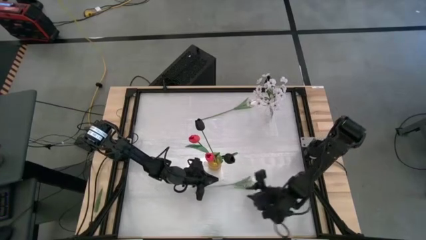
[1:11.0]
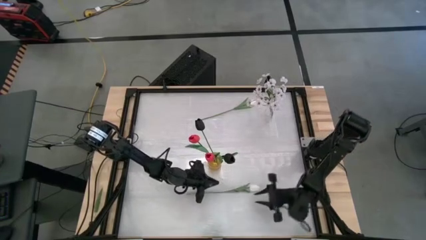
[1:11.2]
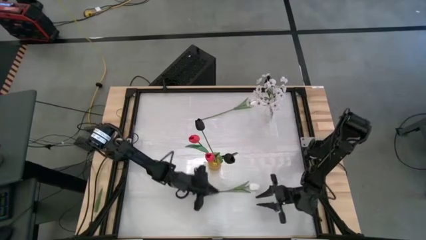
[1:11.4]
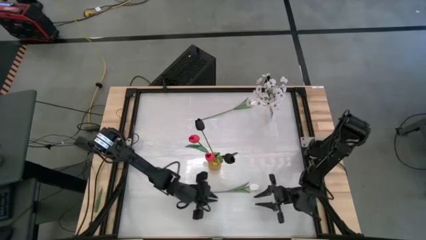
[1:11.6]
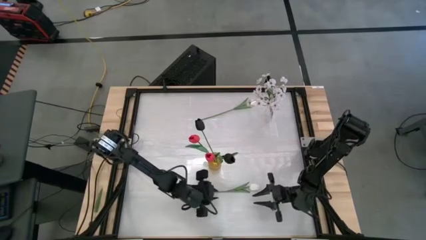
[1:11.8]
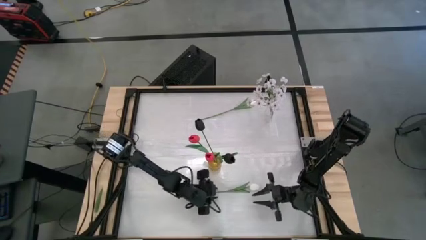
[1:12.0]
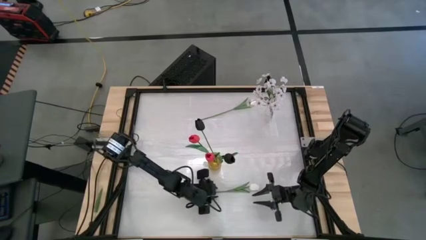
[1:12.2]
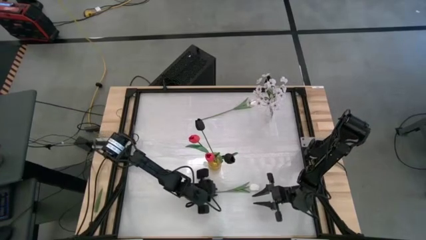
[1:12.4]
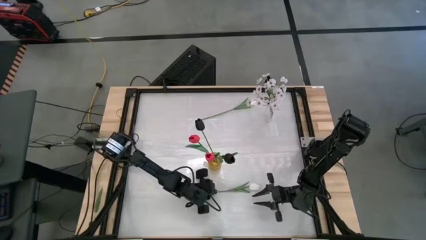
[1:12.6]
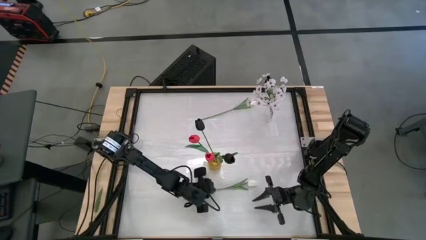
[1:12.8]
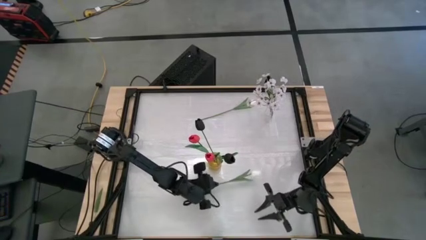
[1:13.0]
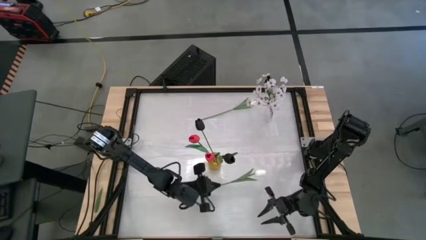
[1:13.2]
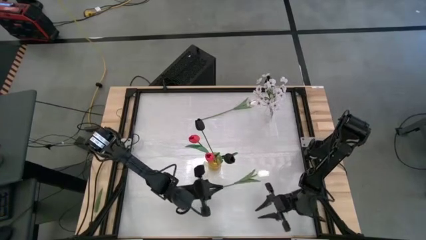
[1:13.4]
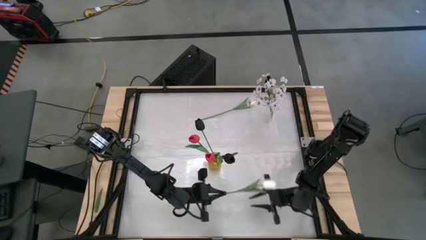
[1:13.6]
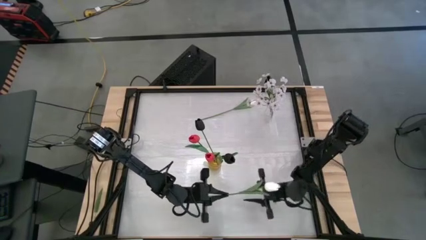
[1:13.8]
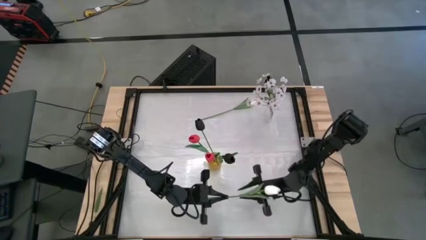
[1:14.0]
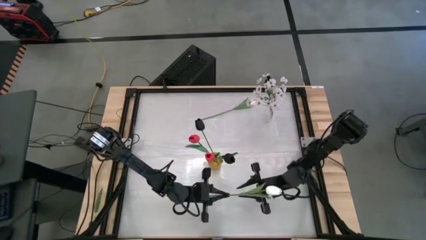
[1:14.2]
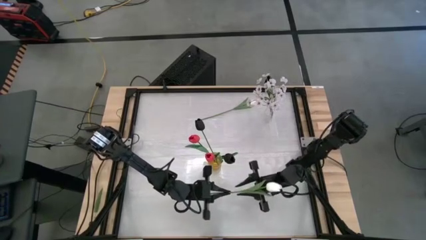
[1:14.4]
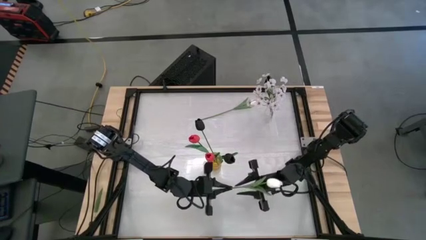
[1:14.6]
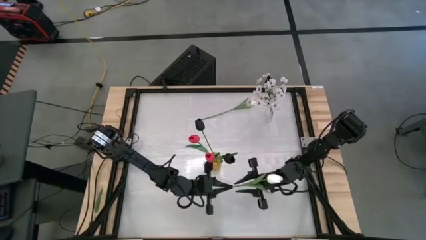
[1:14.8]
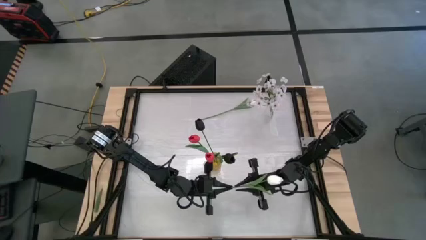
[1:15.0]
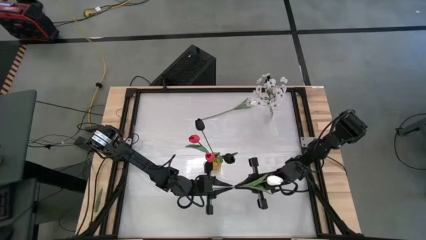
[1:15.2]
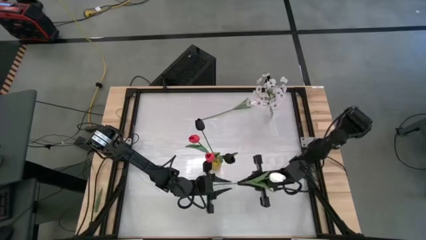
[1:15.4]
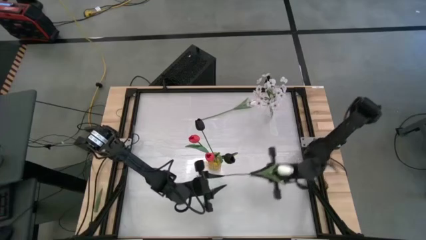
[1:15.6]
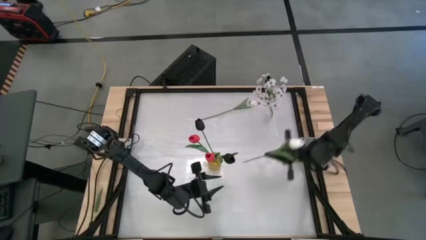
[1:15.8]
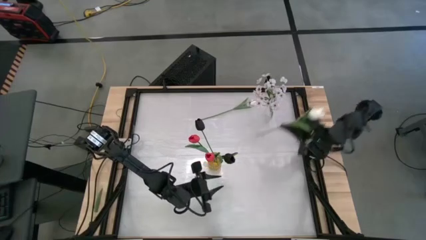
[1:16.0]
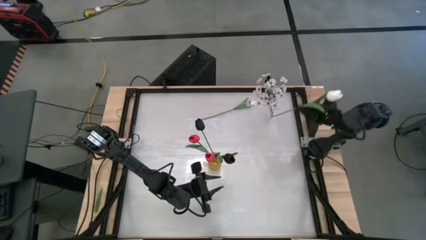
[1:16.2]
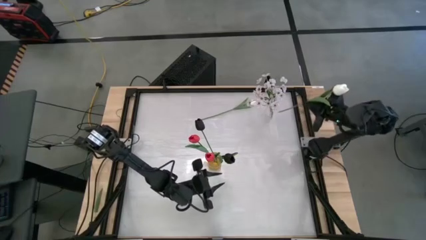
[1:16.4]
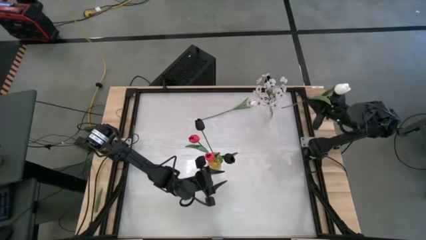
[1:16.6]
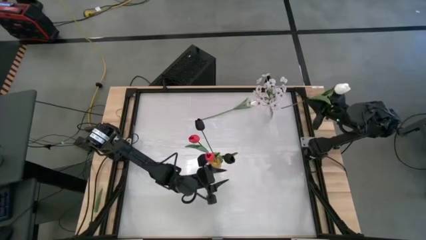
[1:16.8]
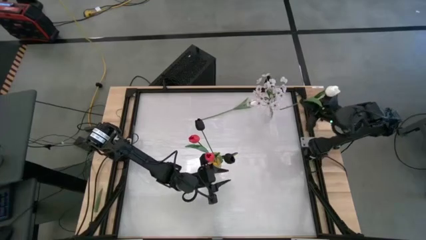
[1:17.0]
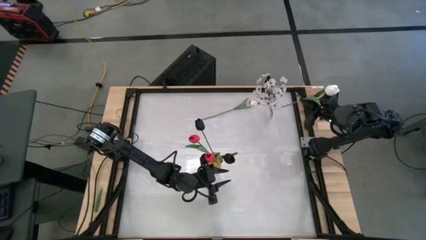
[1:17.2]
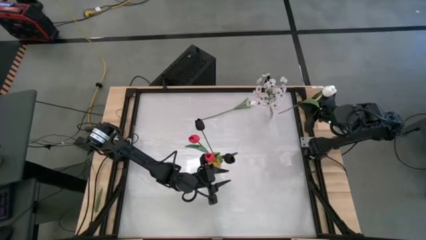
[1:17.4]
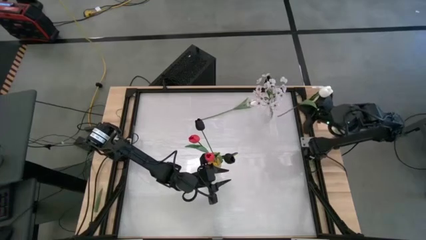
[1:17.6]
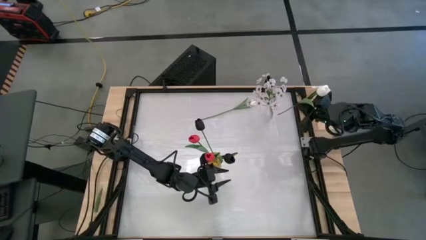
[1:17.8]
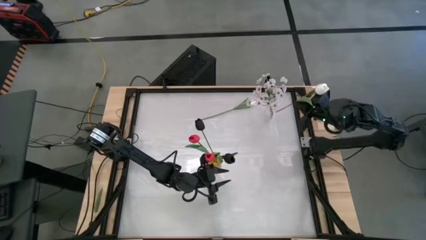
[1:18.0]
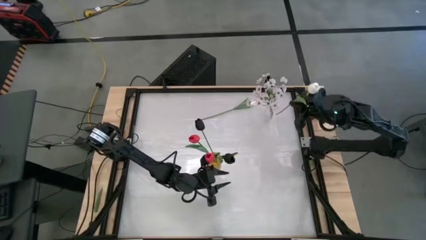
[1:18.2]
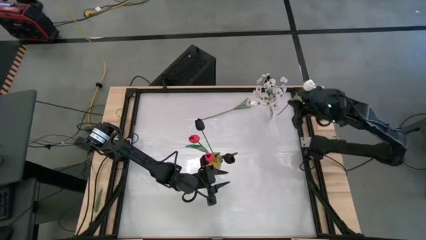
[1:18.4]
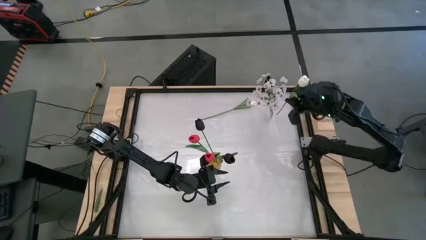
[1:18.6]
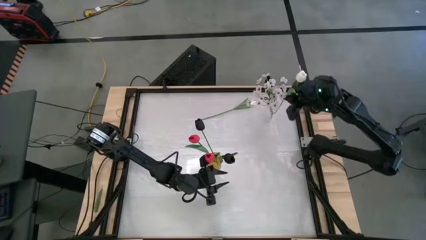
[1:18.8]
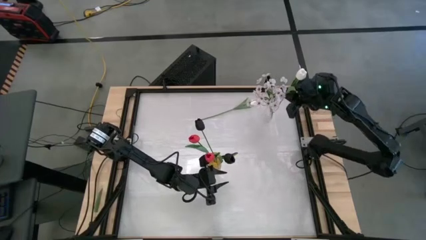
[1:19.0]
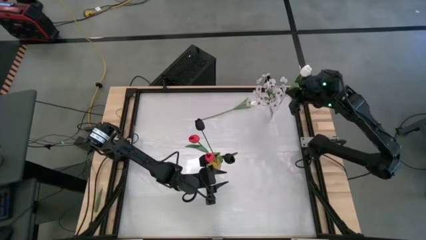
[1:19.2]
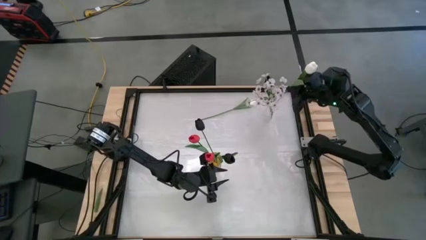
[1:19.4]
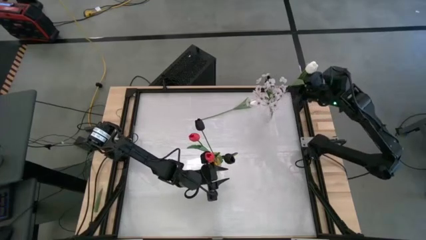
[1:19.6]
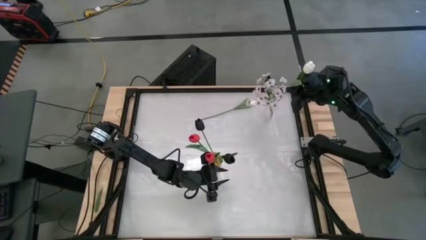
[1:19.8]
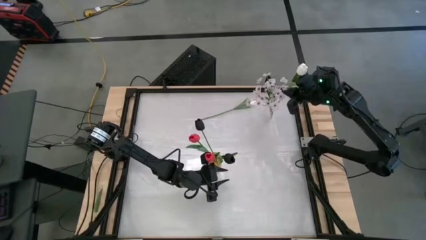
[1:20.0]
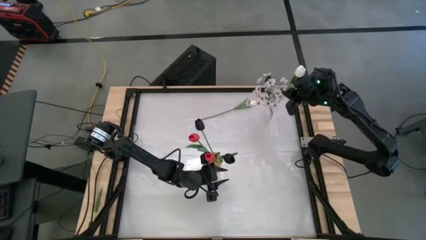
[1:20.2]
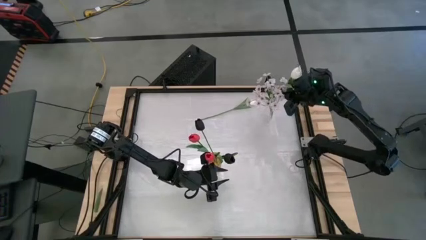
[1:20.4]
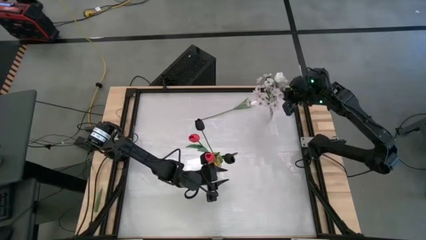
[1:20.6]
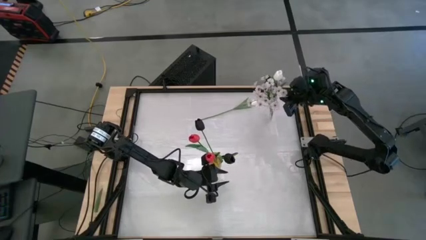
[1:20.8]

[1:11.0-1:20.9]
Task: Sort flowers into vase by color
Put the bottom white tulip into the transparent vase

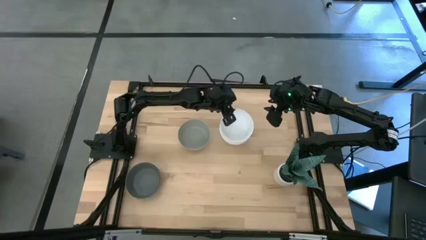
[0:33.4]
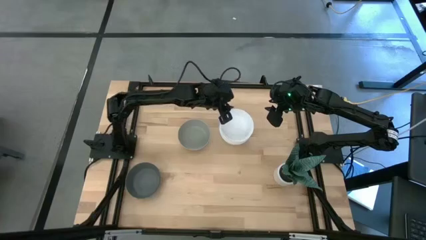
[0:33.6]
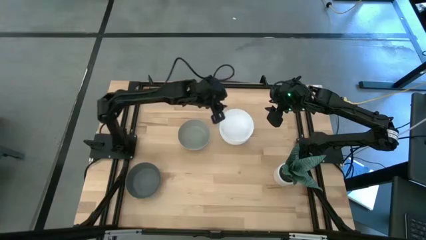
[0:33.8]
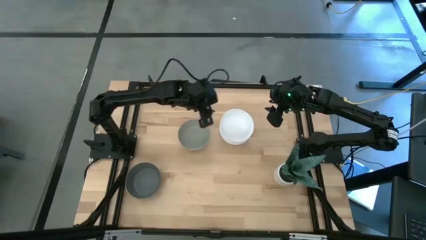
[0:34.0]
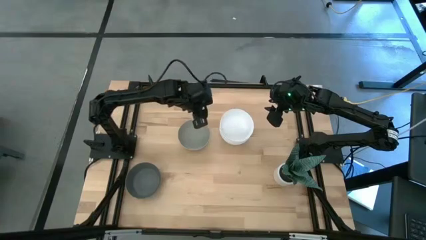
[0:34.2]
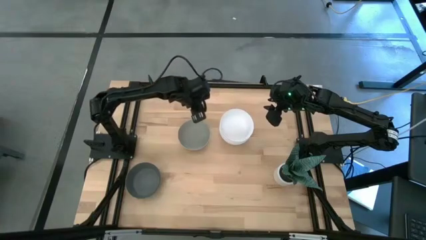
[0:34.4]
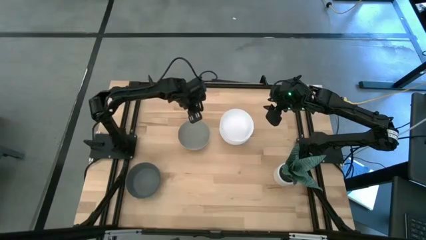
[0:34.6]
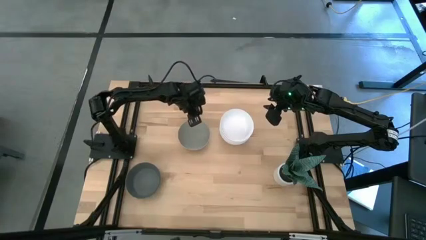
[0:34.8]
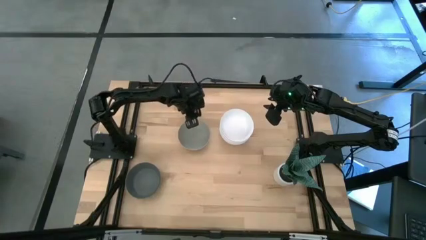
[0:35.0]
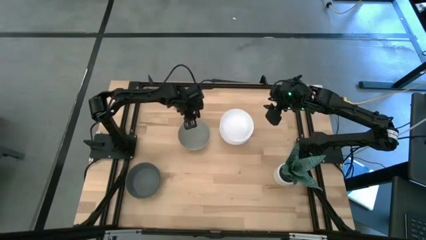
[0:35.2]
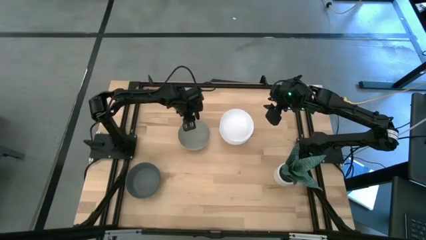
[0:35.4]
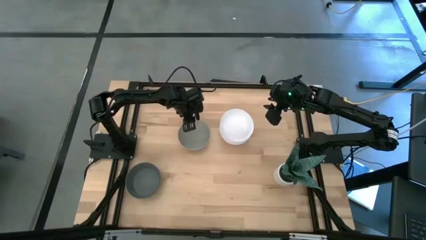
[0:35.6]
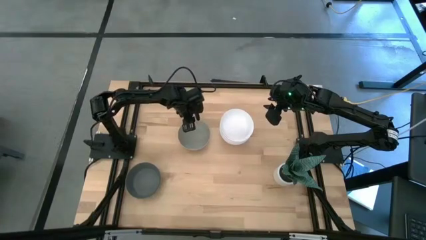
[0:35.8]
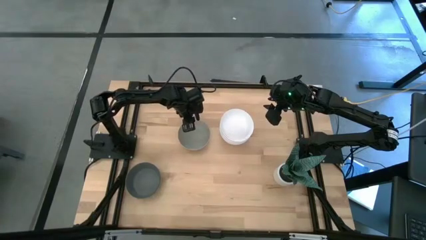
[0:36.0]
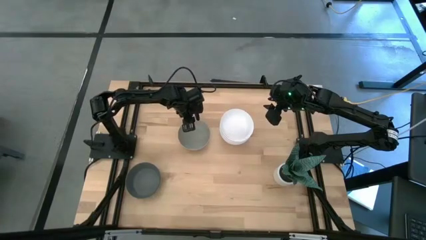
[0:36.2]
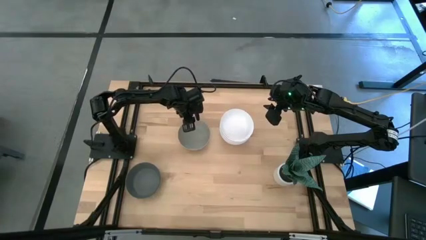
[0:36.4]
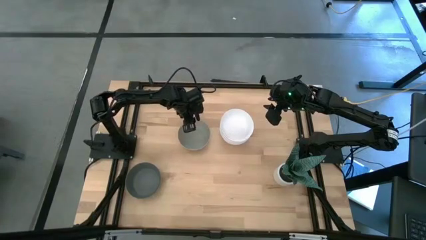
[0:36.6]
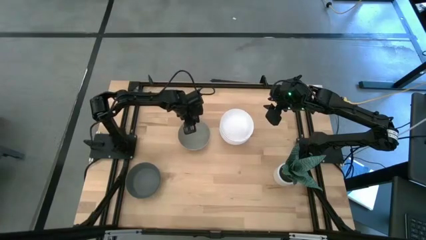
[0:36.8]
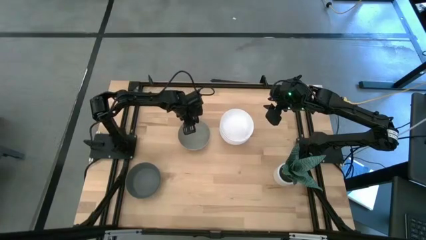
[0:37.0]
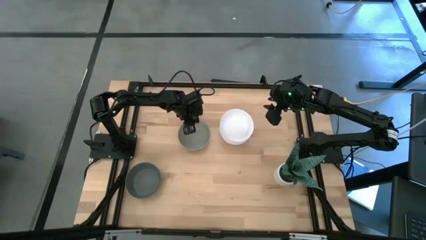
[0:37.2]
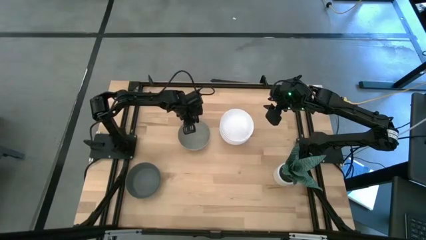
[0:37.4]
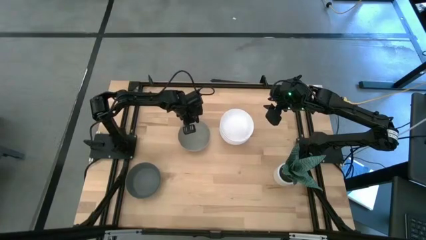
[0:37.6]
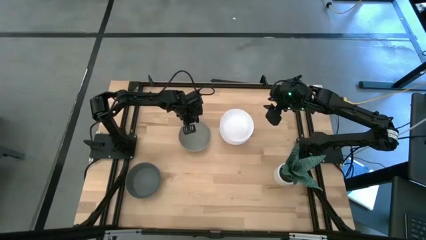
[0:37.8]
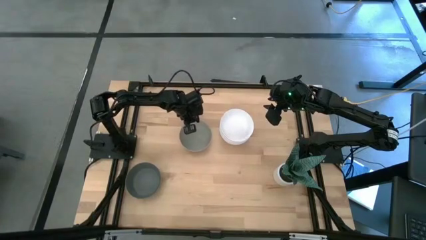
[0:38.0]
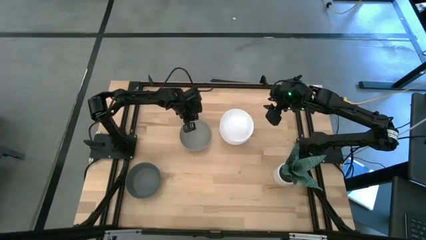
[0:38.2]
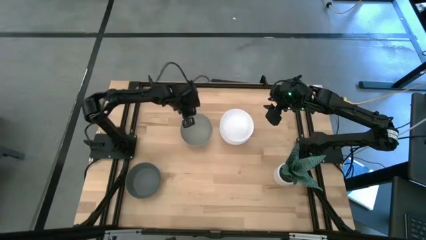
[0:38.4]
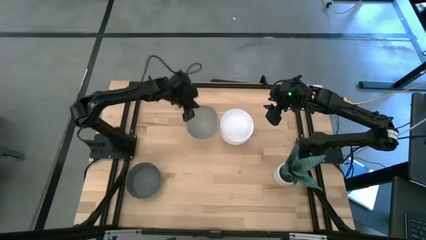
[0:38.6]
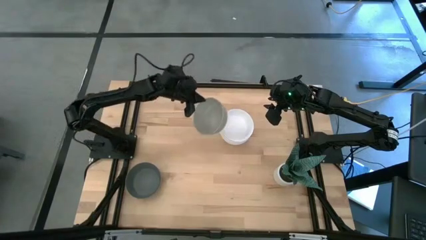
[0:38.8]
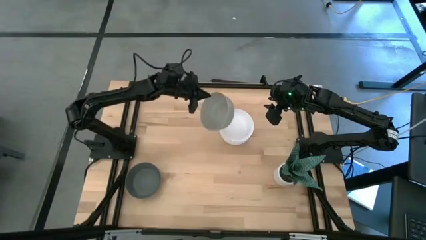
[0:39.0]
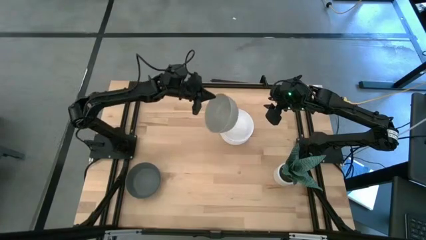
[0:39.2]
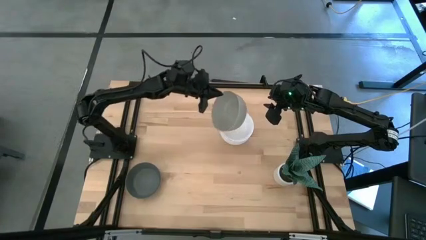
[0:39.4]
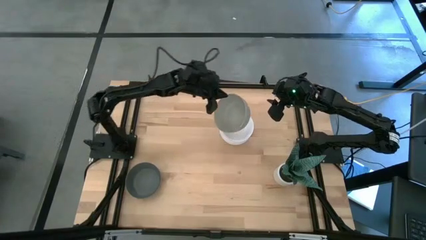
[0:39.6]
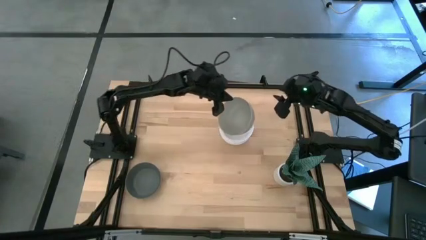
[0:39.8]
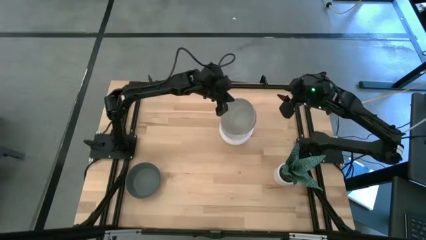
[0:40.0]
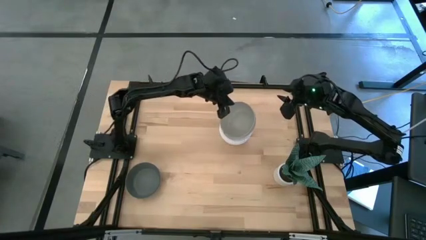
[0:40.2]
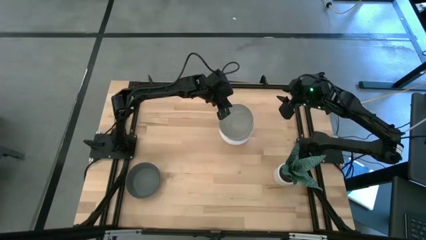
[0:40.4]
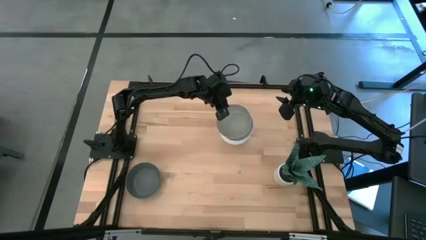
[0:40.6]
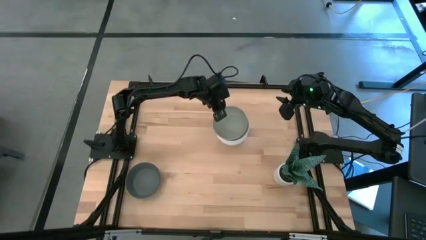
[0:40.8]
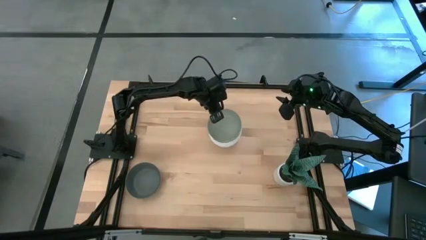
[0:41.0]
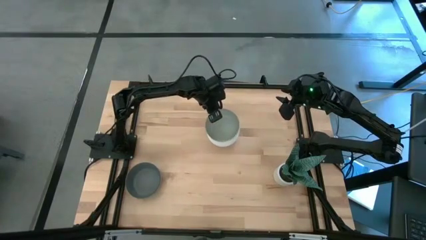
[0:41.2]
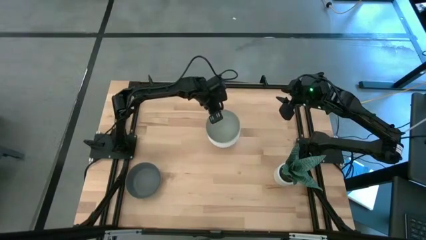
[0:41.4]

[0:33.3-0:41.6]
Task: Nest bowls inside each other
Stack the light gray bowl on top of the white bowl
